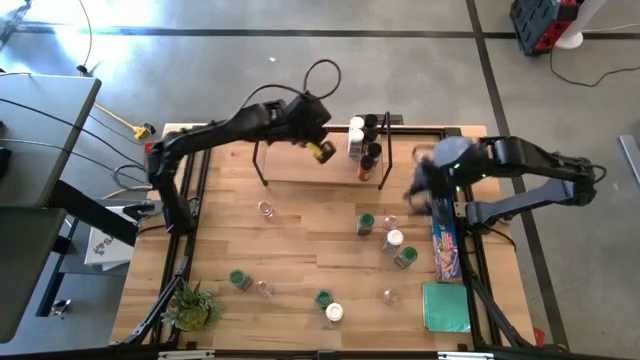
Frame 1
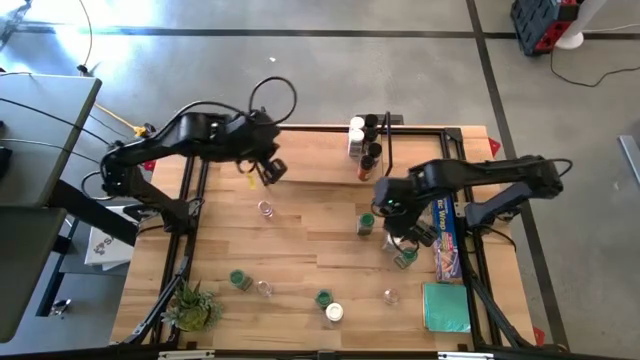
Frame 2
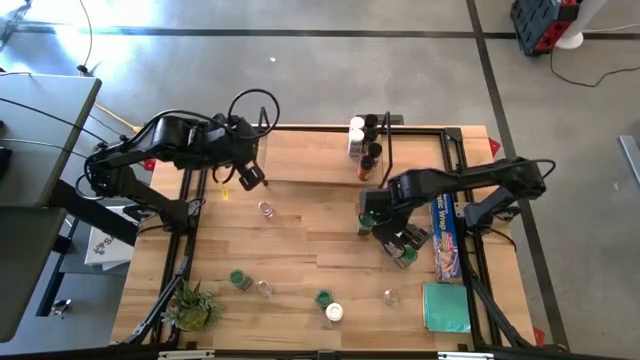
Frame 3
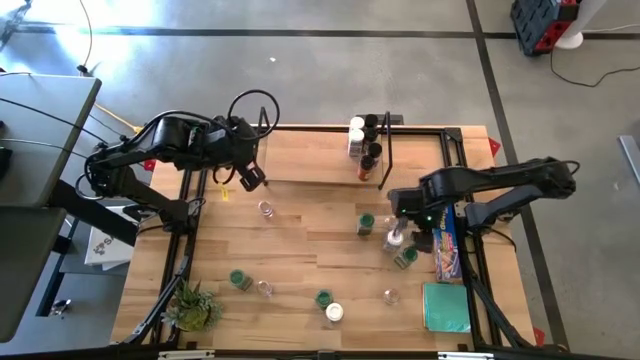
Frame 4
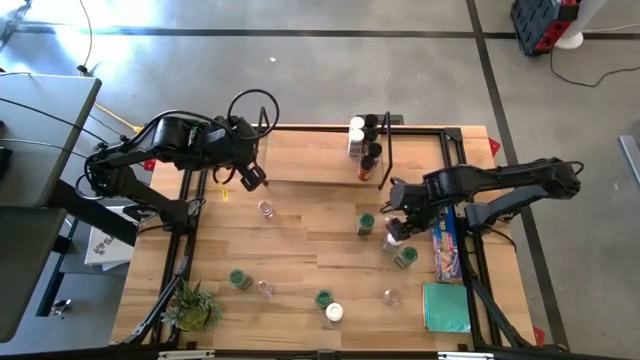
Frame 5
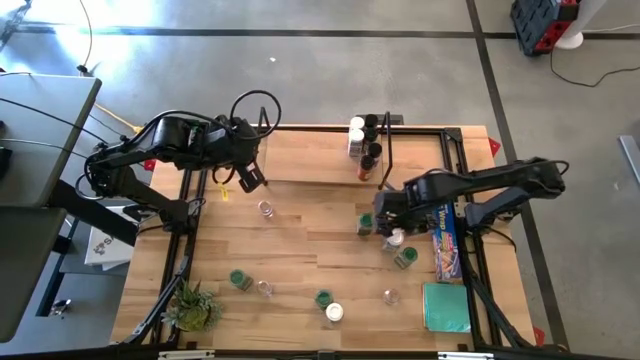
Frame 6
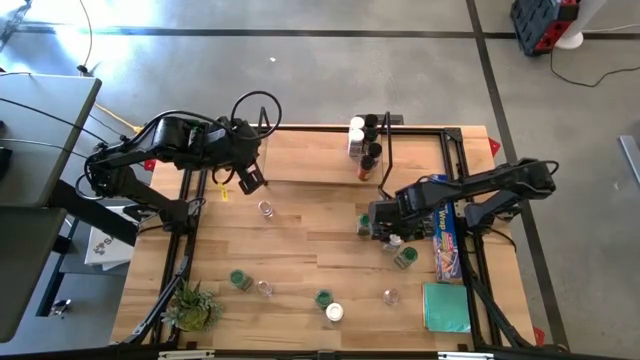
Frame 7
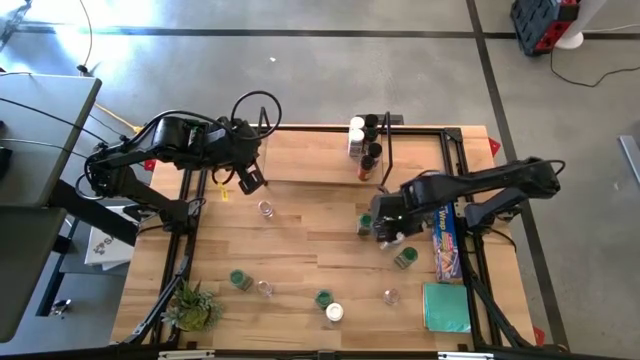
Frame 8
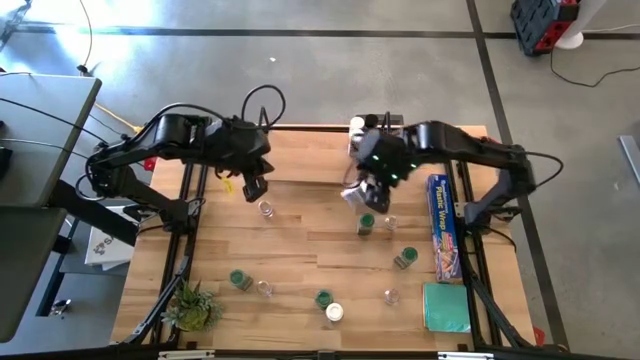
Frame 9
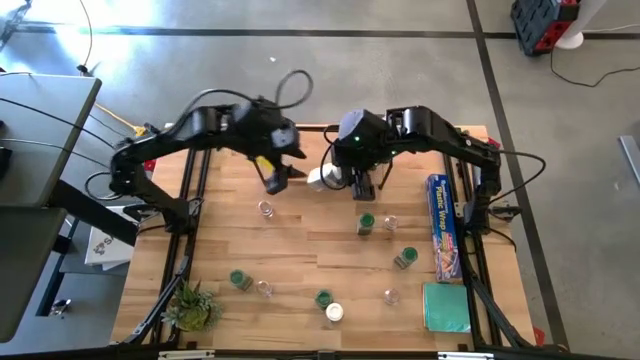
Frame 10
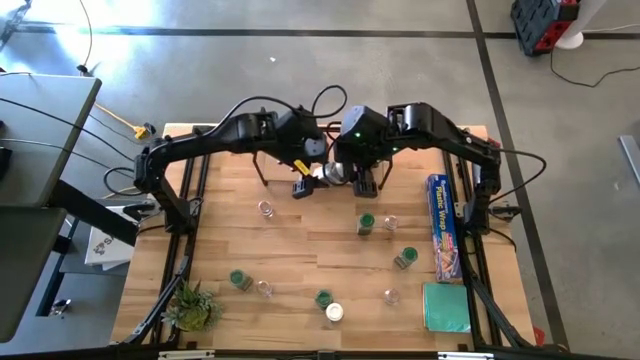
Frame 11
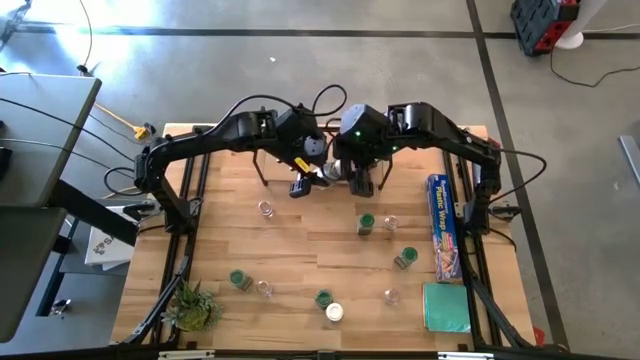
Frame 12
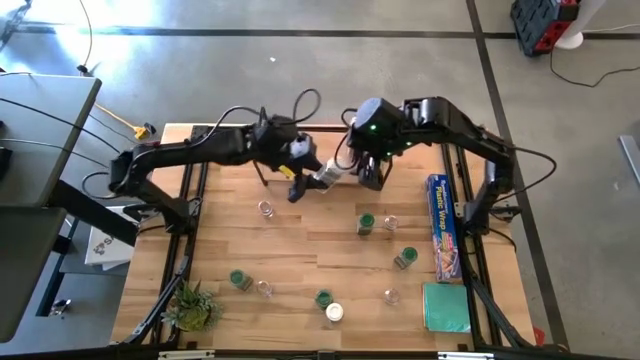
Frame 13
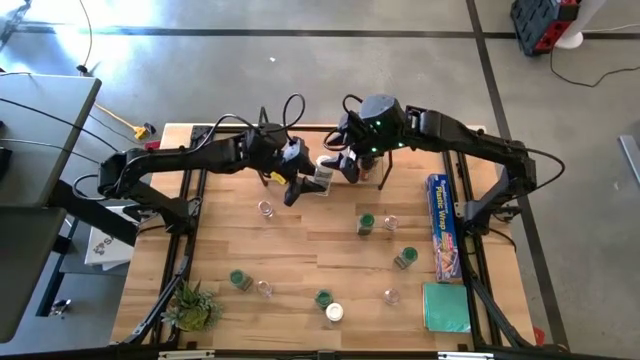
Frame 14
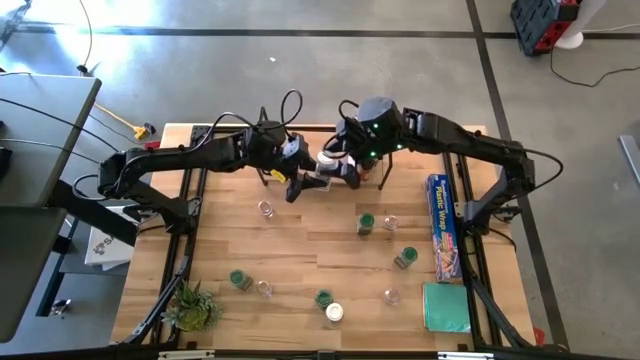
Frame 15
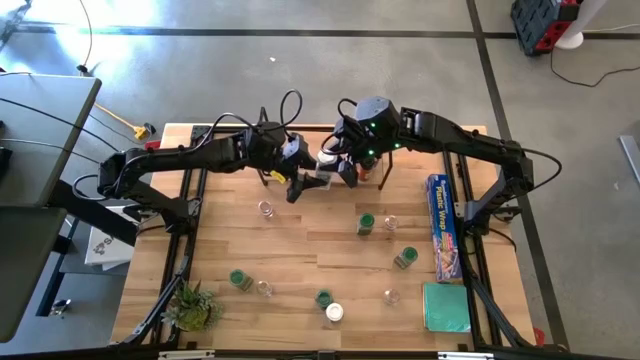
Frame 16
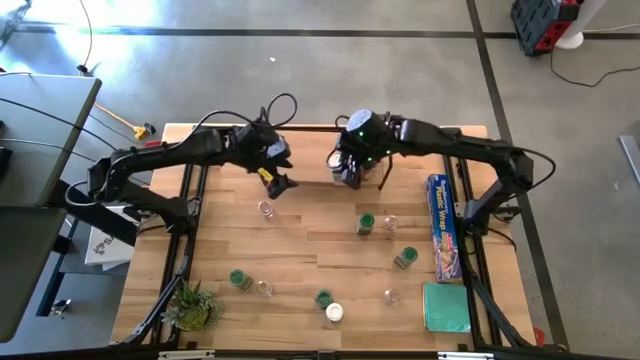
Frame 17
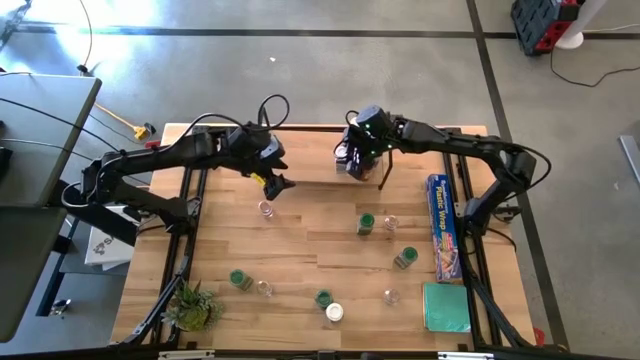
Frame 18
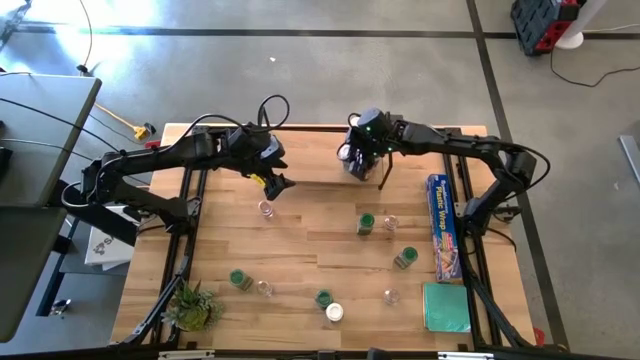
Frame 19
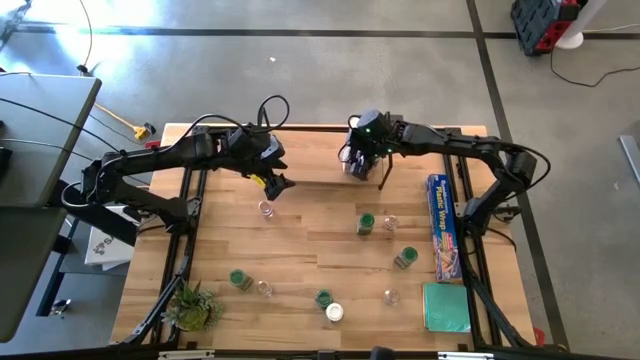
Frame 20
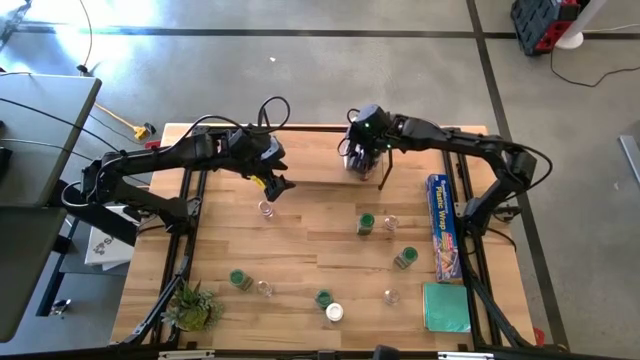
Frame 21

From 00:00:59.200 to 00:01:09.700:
Task: Shelf spices
Put the white seasoning bottle on the shelf aligned with the other white seasoning bottles

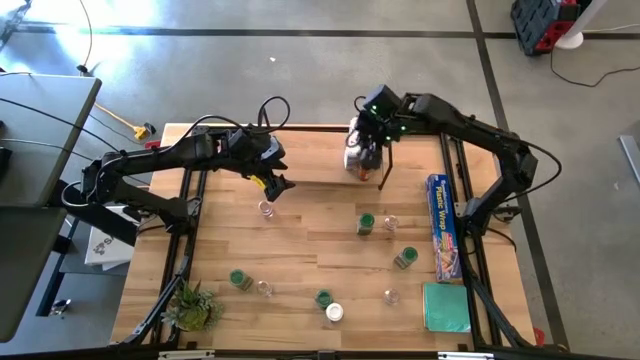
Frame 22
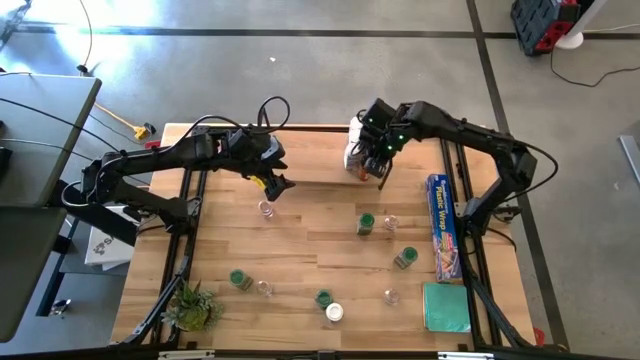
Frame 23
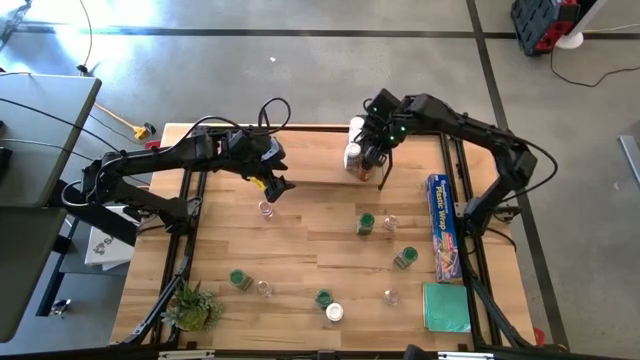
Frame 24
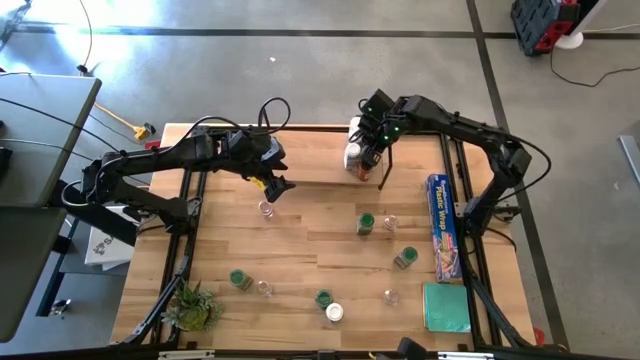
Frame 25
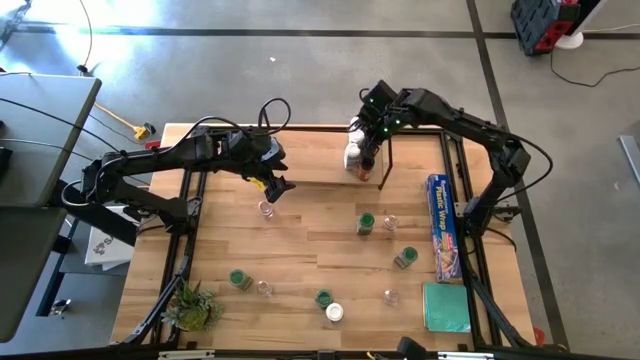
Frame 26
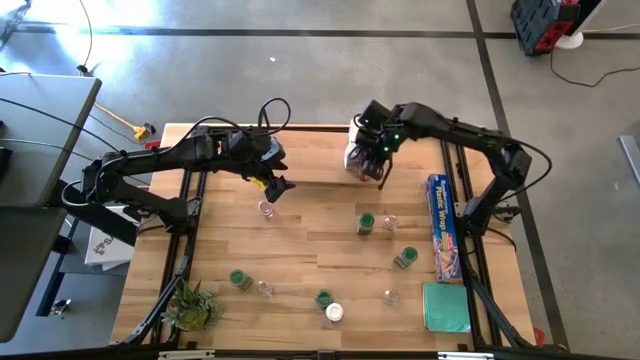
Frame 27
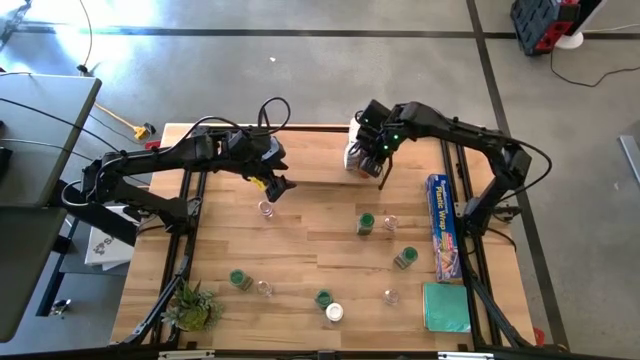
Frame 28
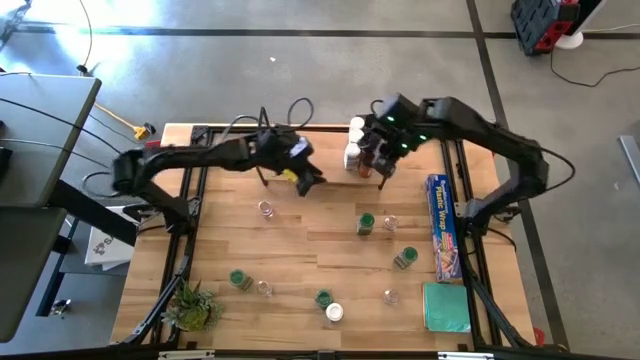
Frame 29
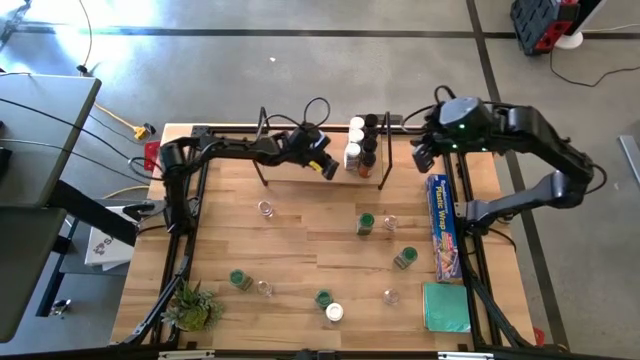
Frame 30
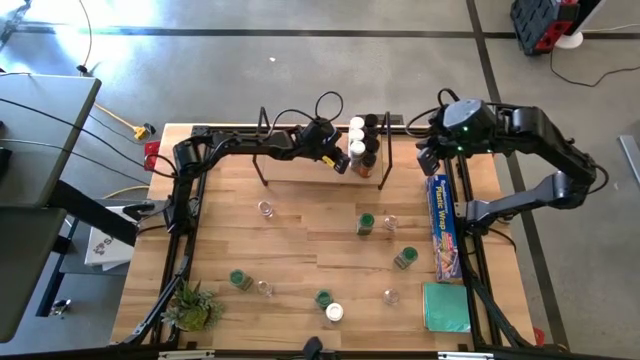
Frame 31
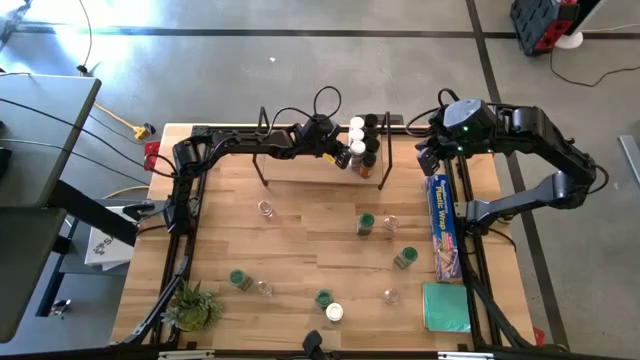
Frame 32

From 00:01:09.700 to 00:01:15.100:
Adjust the seasoning bottles on the shelf

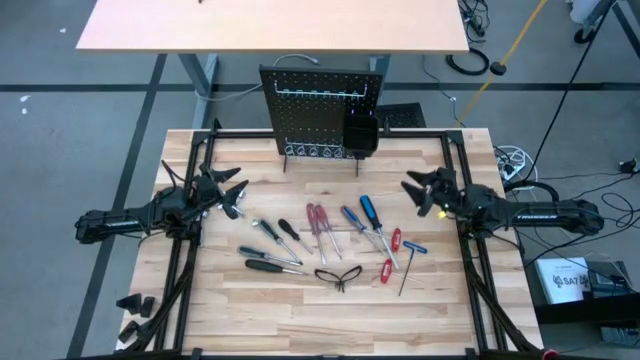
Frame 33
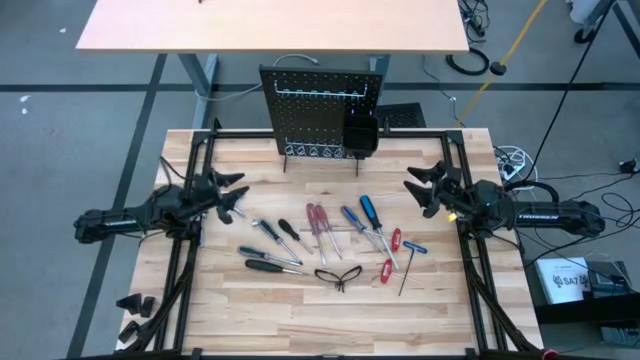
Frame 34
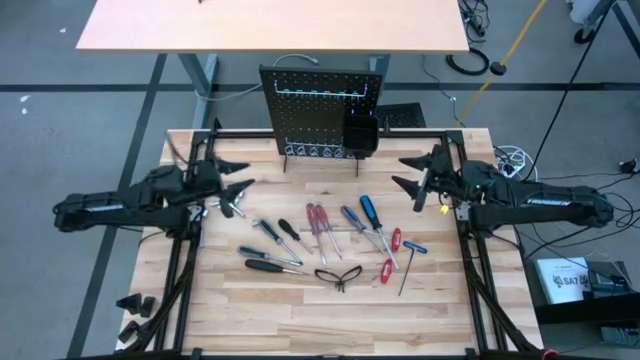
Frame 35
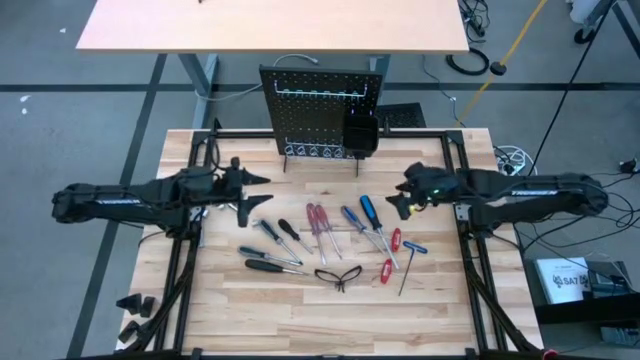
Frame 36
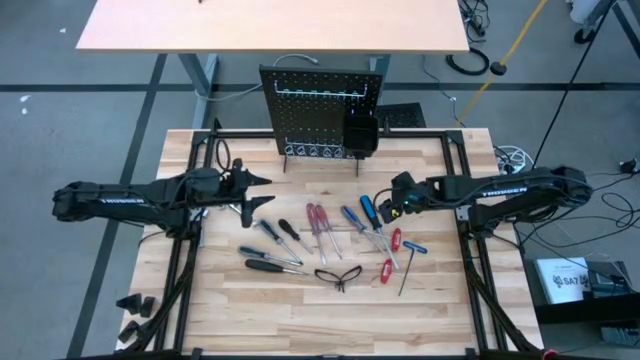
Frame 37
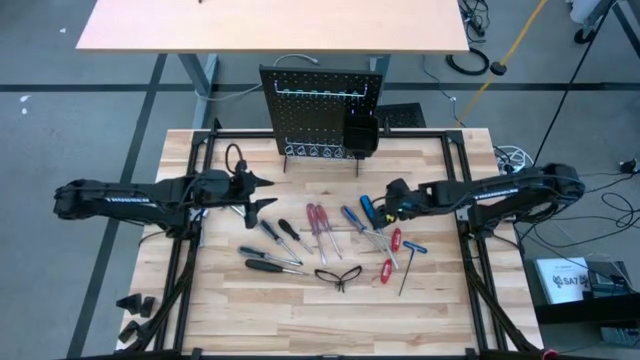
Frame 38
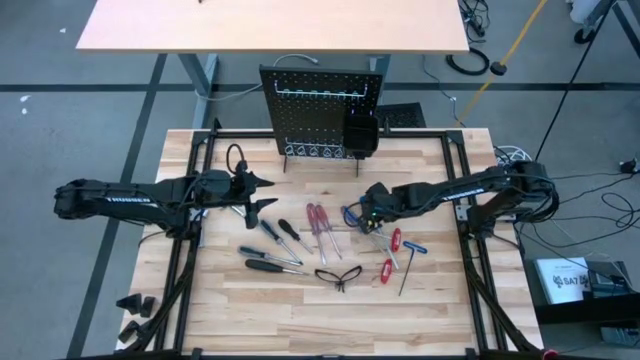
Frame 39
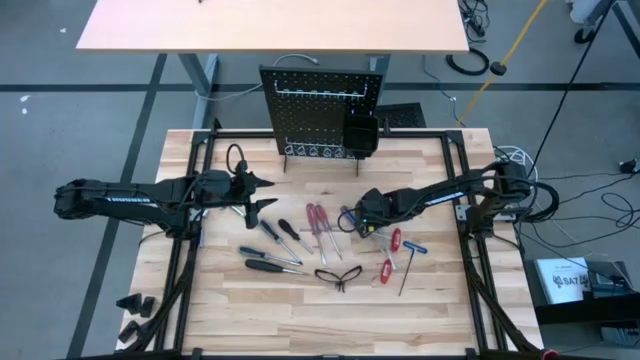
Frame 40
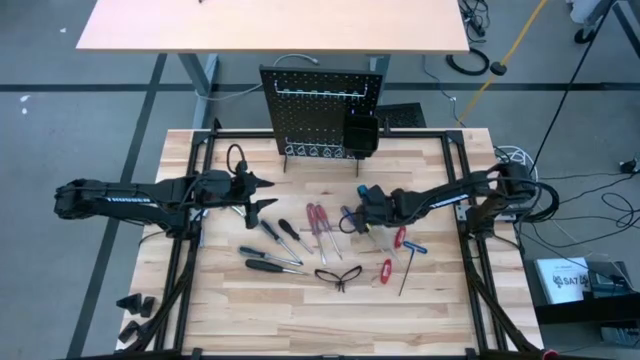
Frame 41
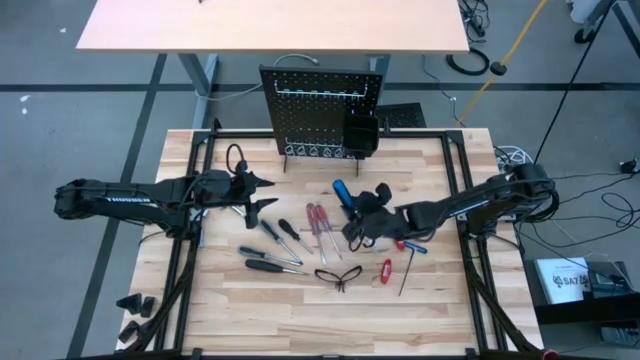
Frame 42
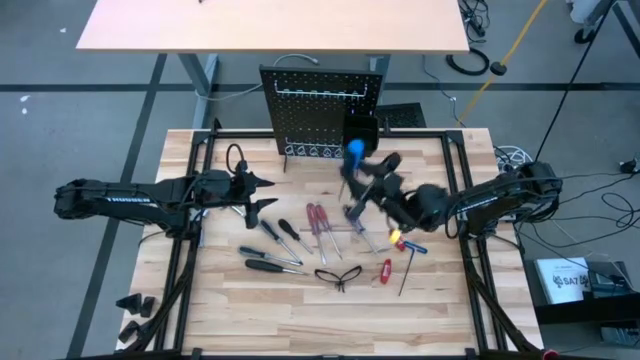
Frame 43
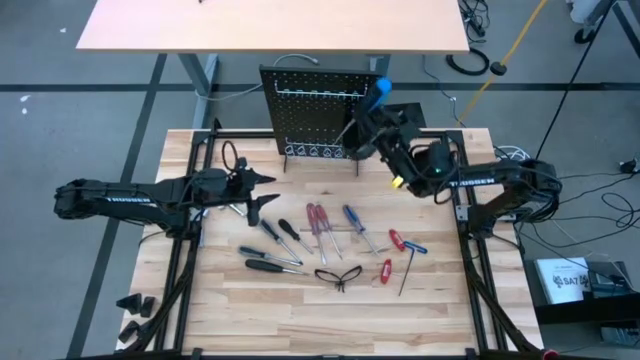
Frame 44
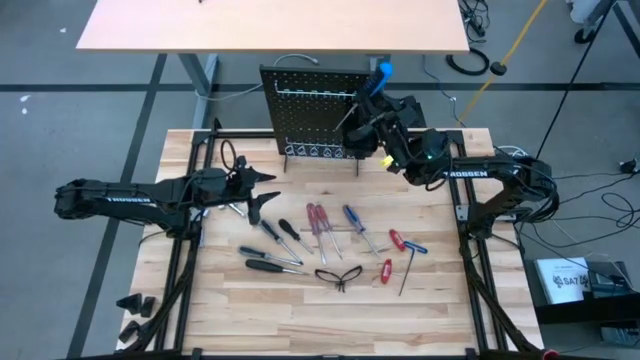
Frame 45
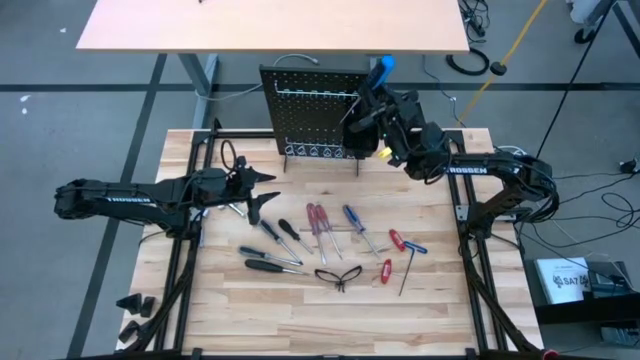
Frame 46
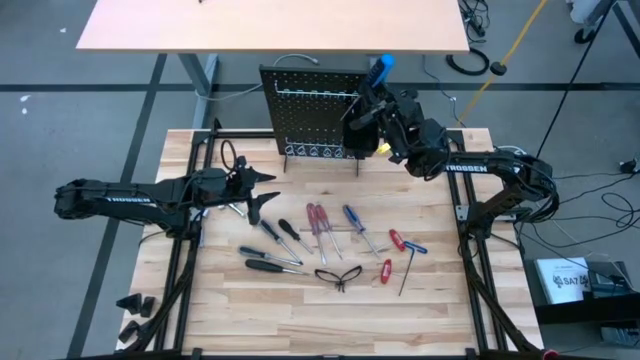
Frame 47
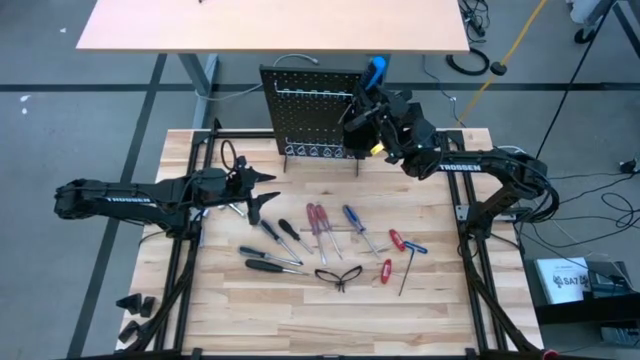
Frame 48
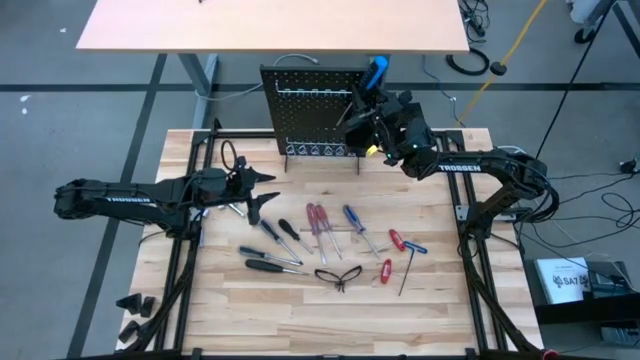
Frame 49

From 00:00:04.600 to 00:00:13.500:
Task: Hang tools onto peg board
Hang the blue screwdriver onto the peg board
